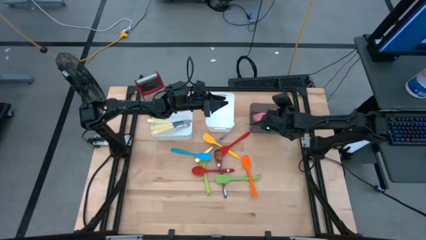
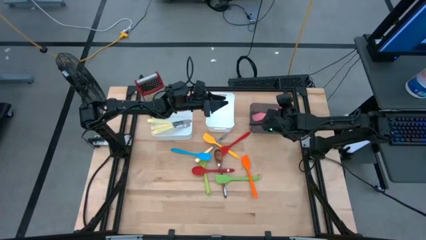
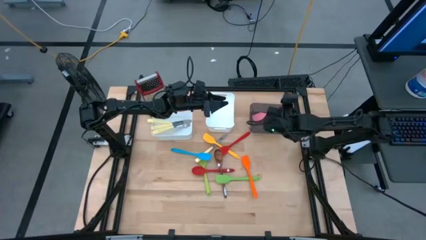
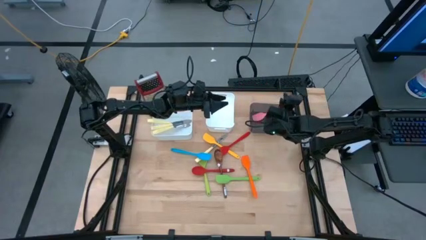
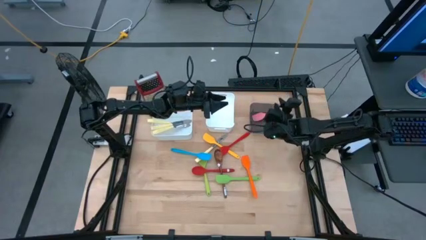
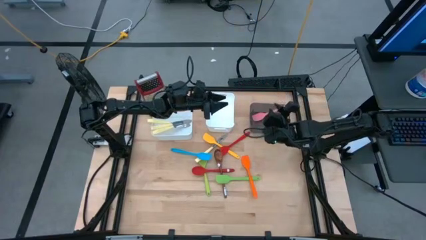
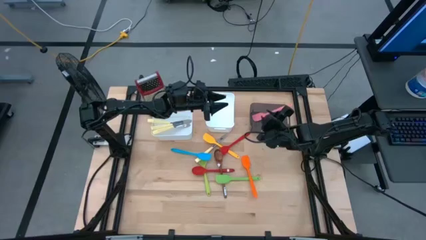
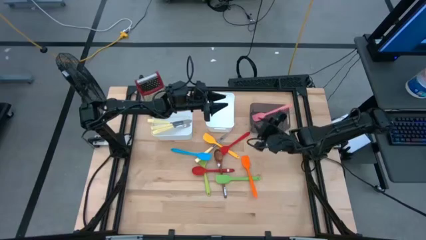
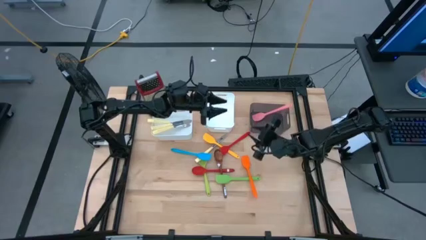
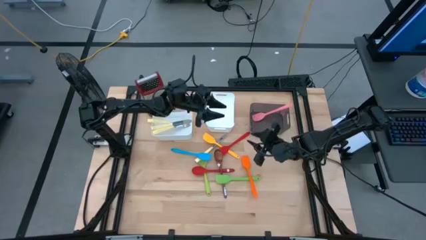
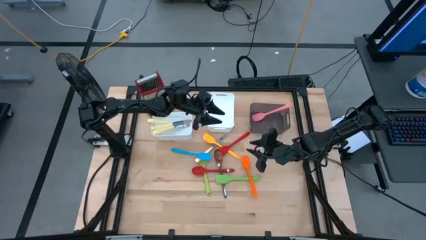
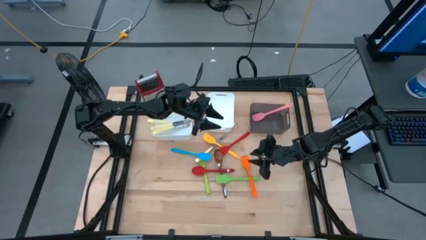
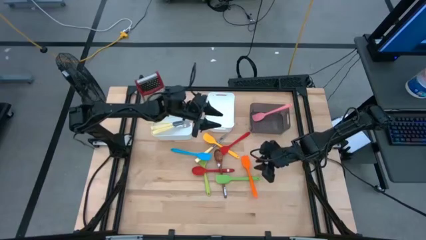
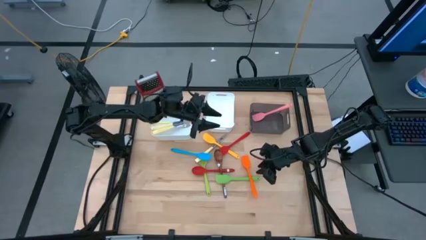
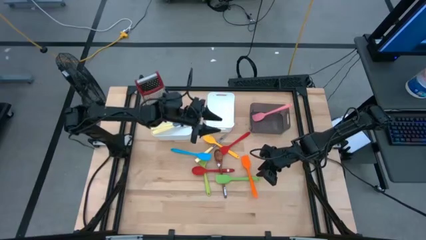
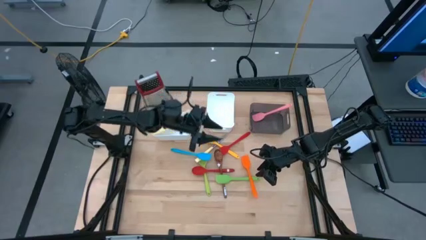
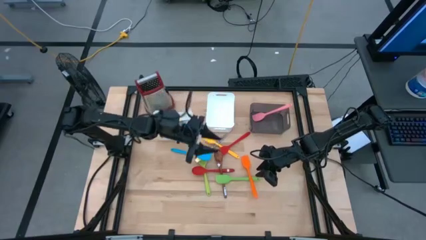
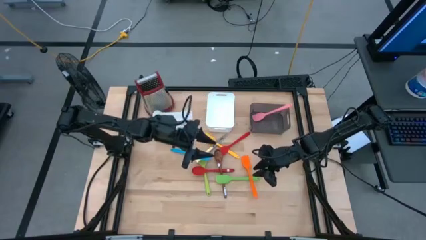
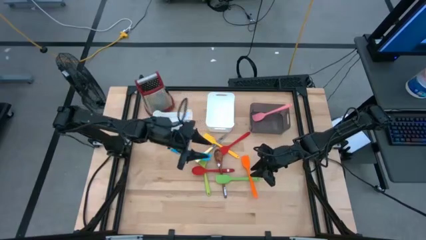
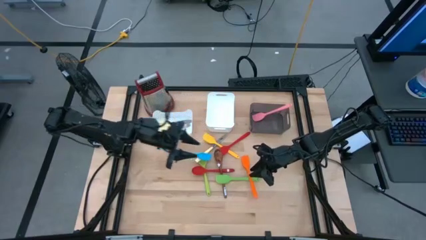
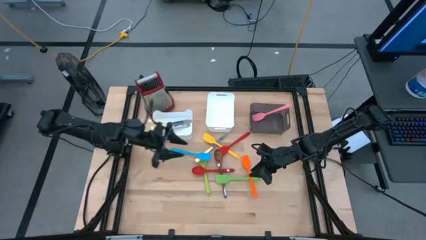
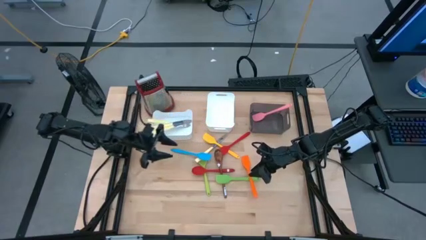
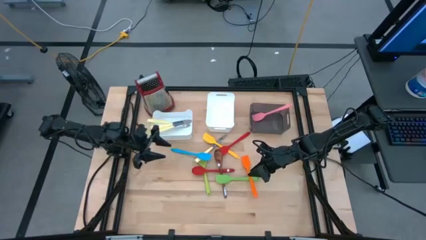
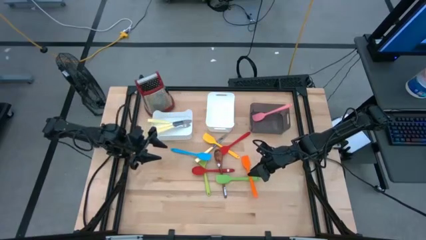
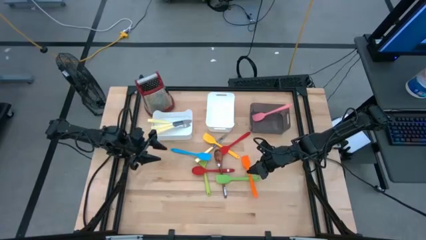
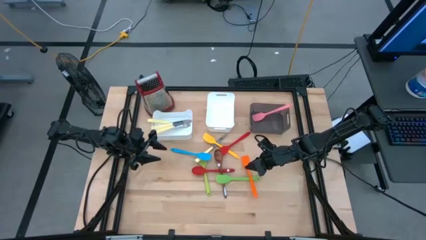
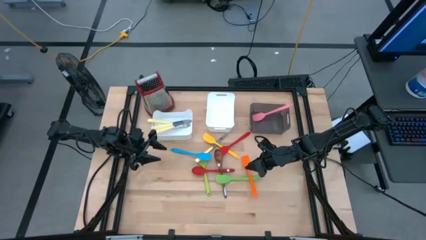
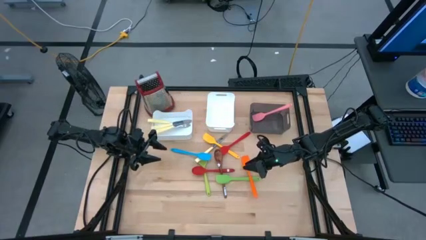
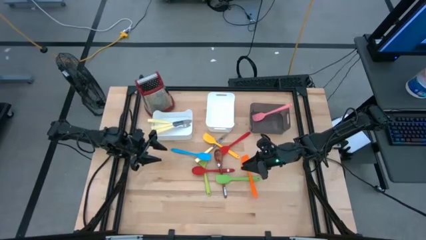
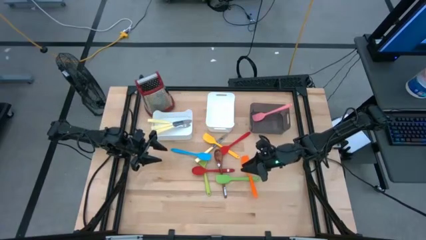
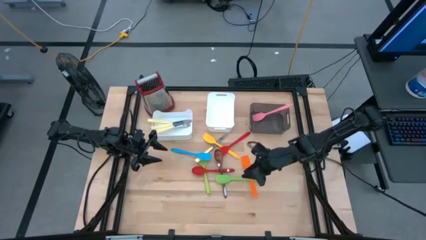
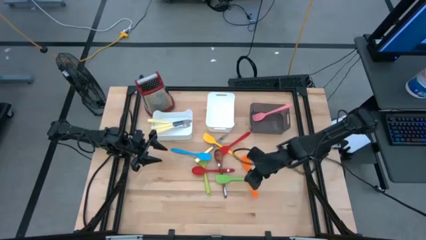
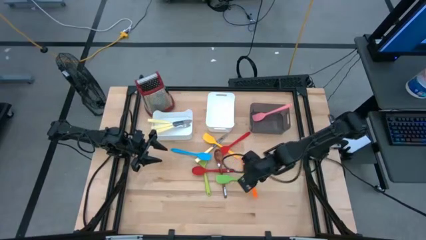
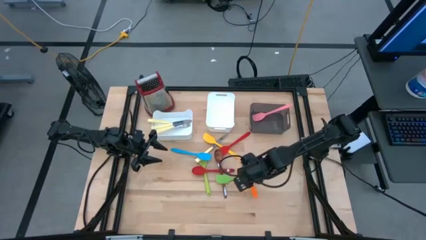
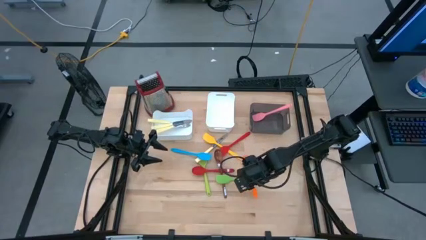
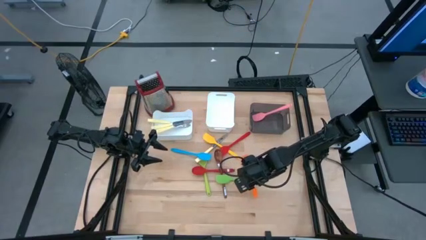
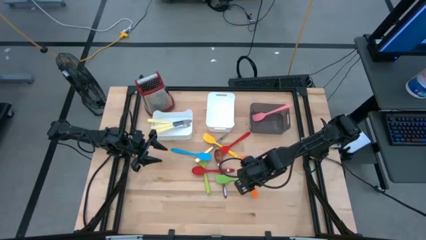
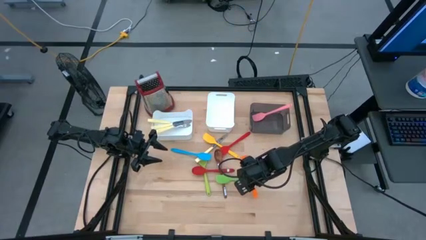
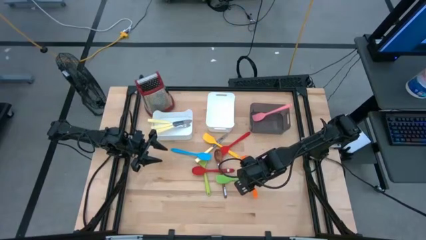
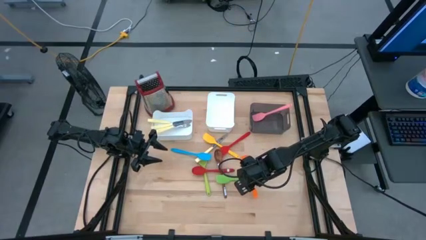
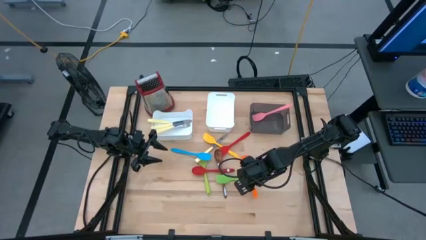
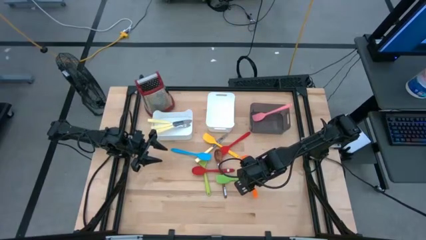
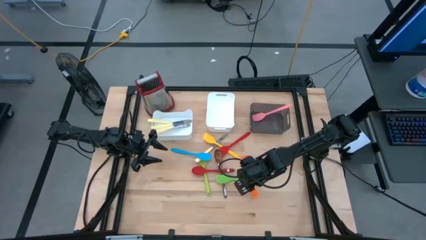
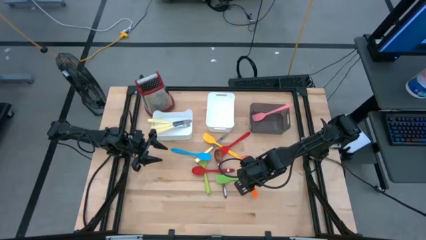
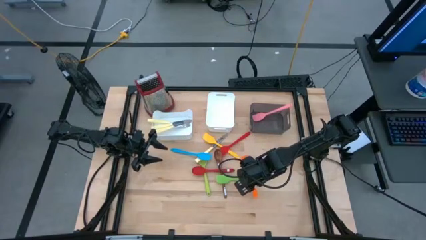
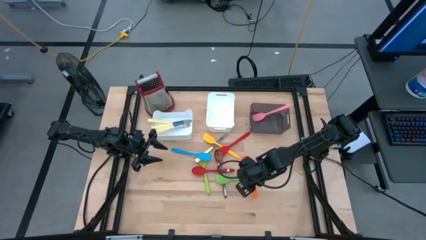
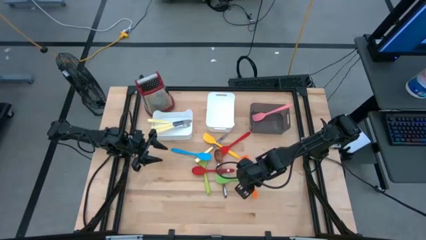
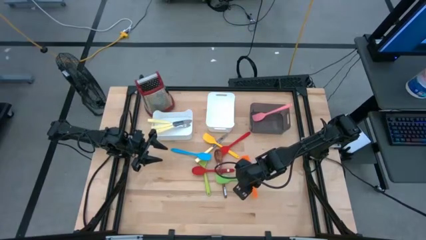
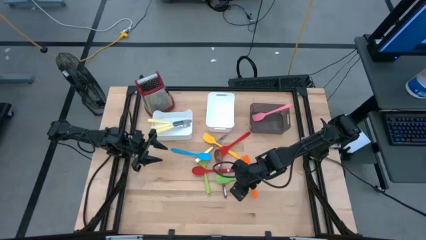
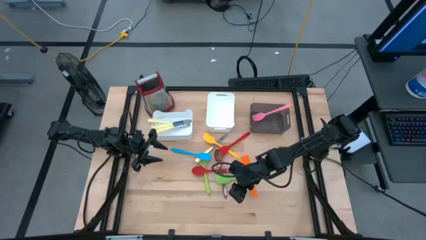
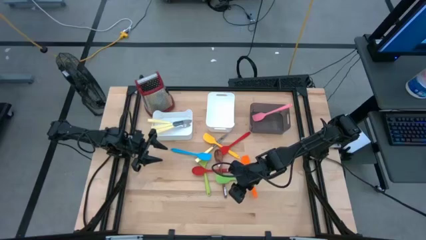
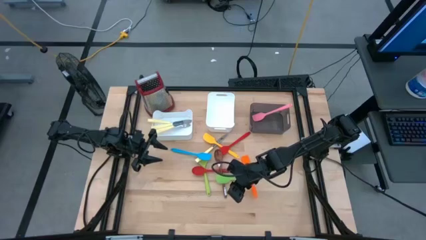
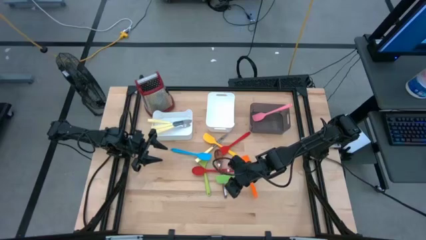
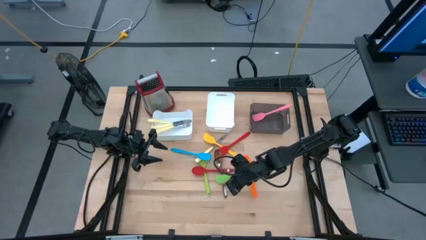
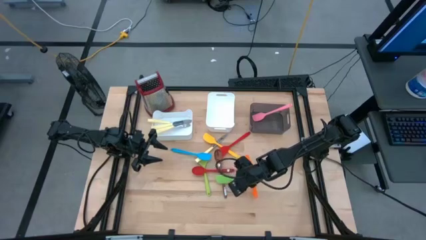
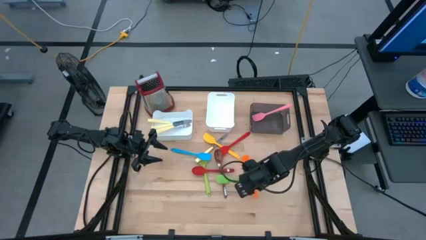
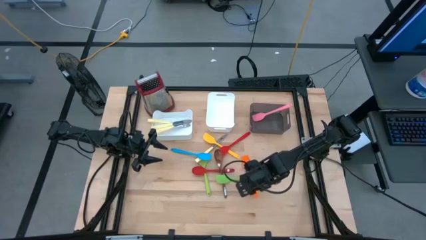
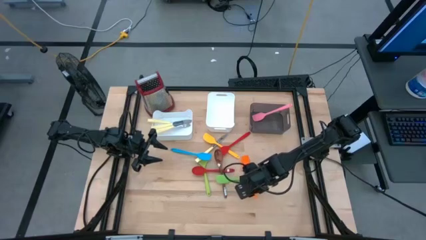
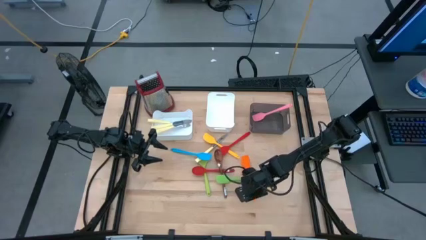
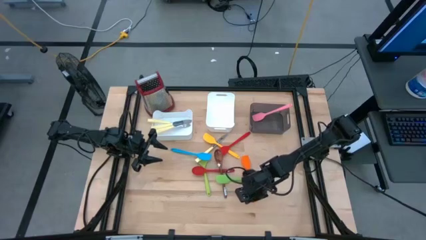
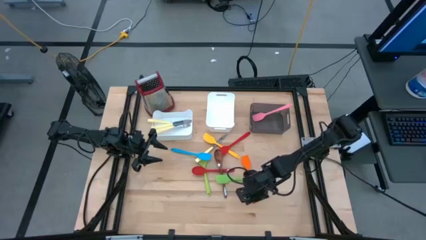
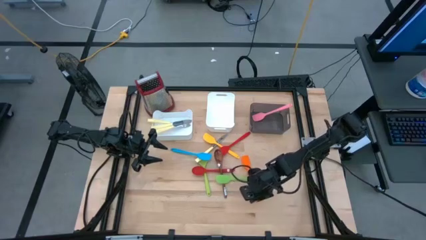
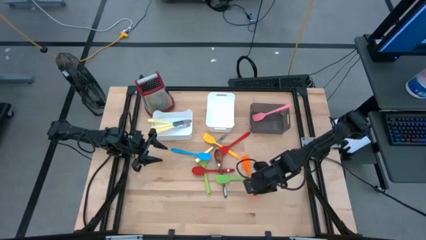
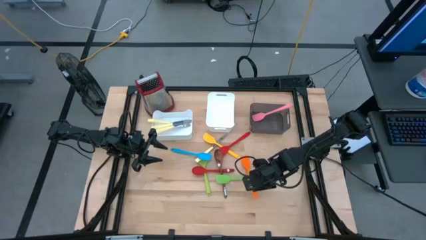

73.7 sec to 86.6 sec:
Task: Pick & Place Kitchen Items
Put the orange spatula into the black bin
